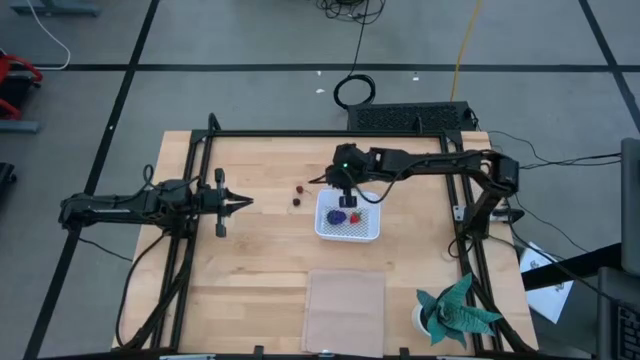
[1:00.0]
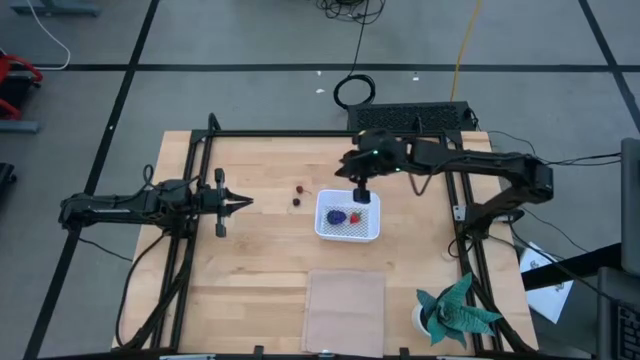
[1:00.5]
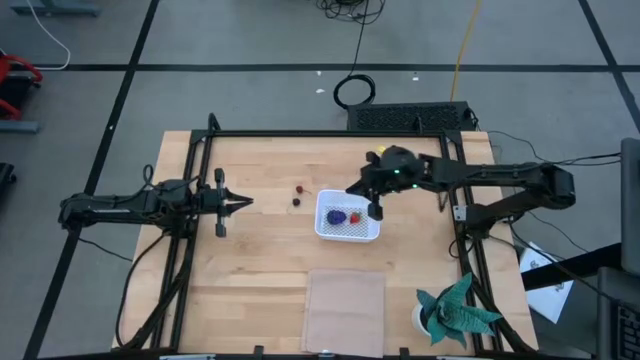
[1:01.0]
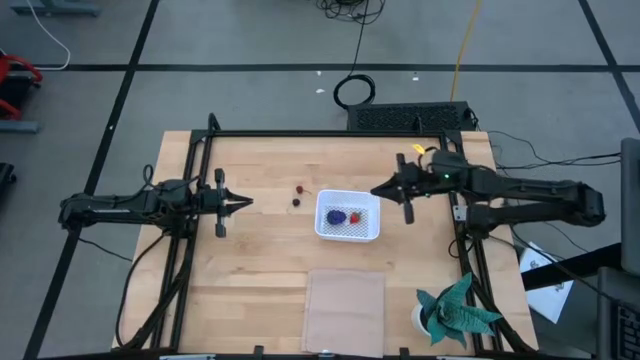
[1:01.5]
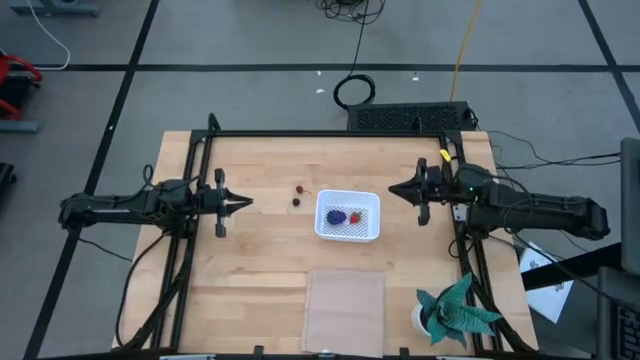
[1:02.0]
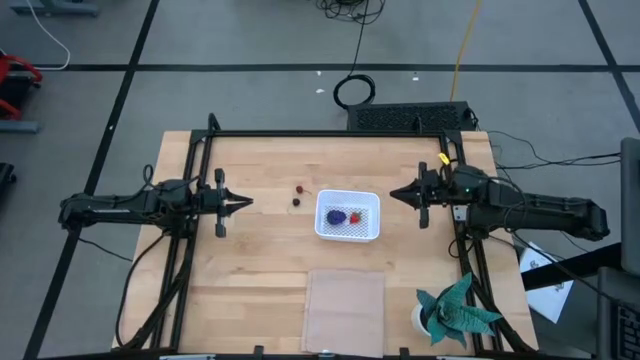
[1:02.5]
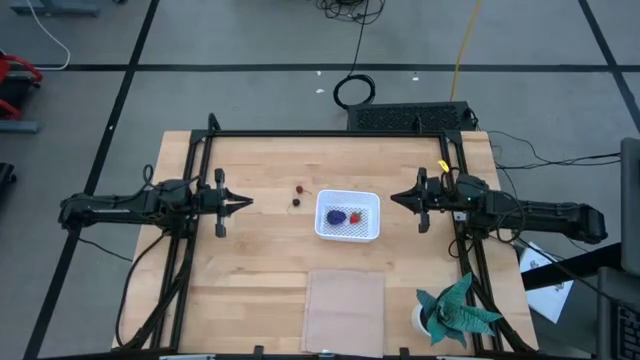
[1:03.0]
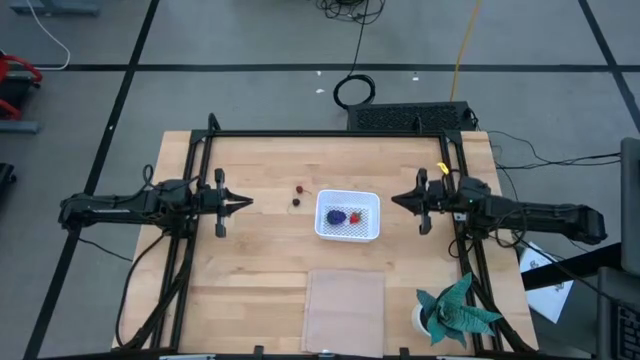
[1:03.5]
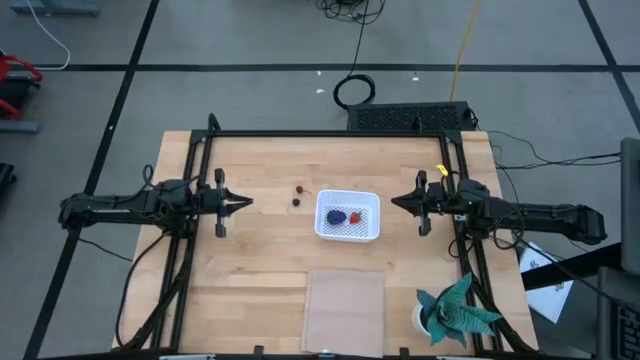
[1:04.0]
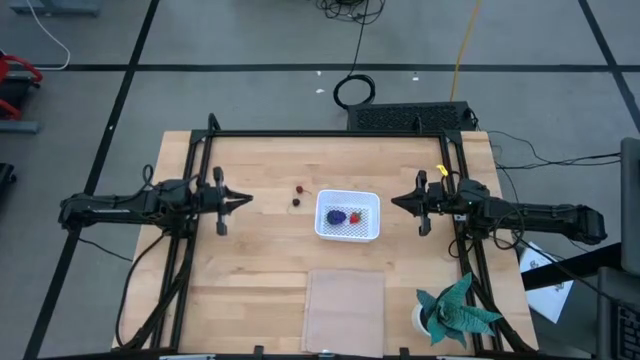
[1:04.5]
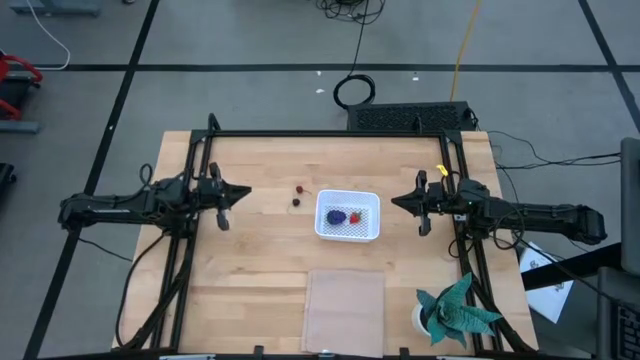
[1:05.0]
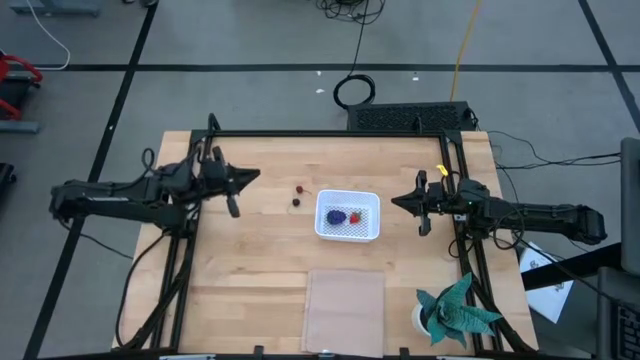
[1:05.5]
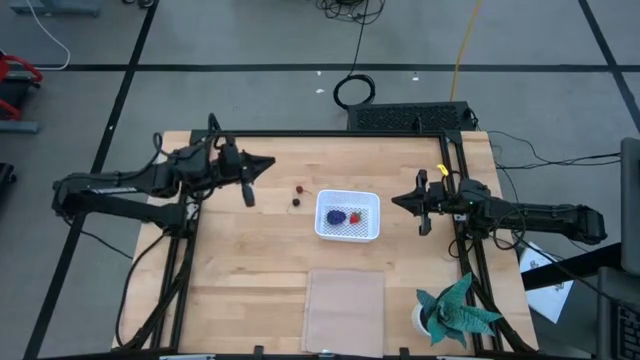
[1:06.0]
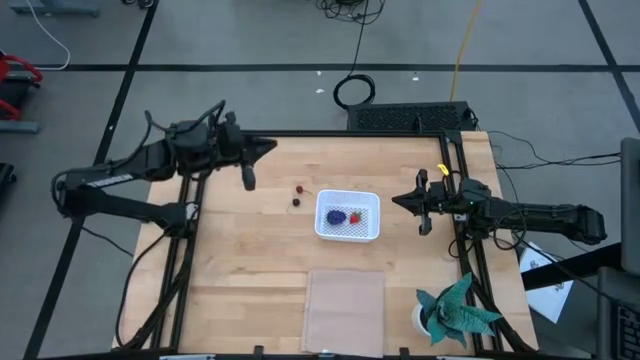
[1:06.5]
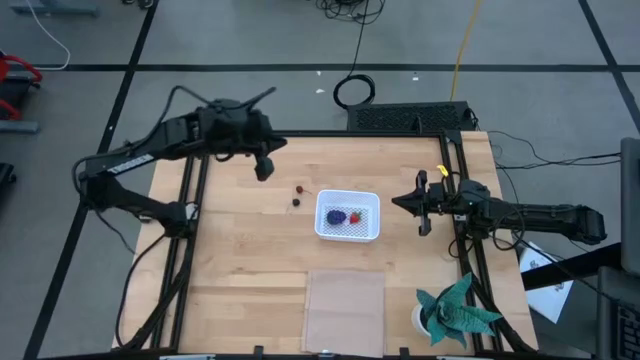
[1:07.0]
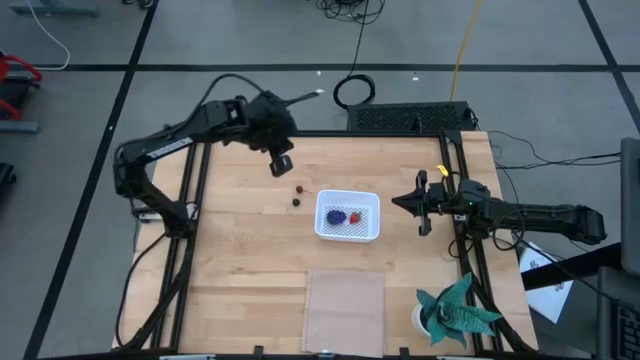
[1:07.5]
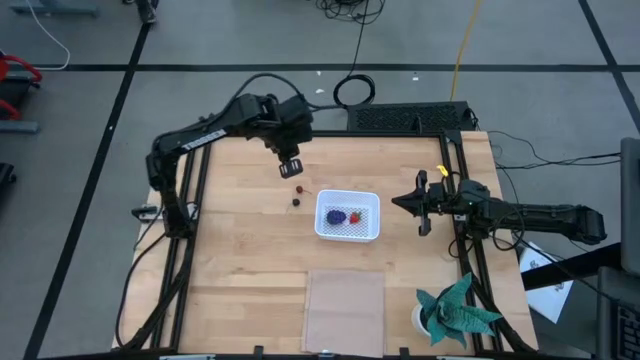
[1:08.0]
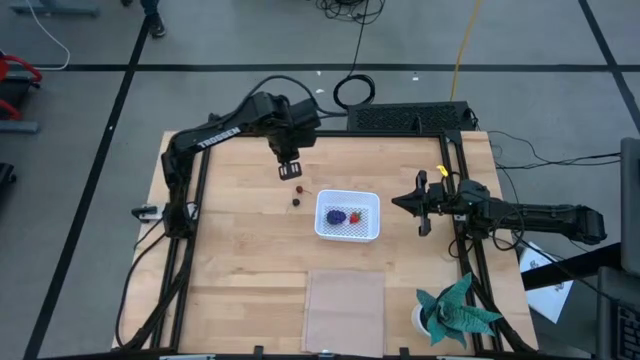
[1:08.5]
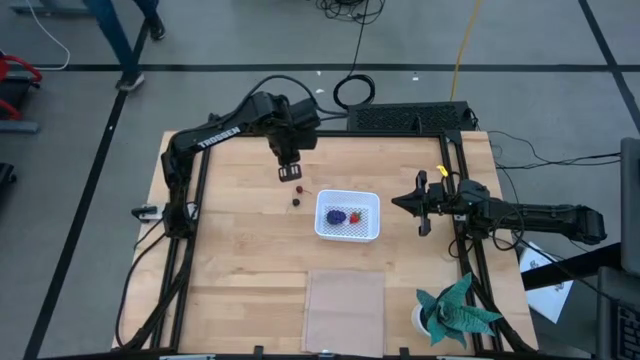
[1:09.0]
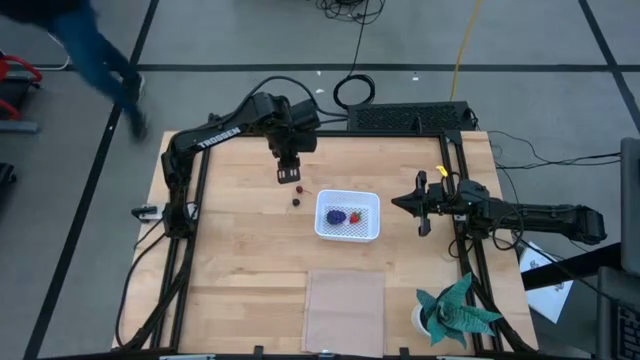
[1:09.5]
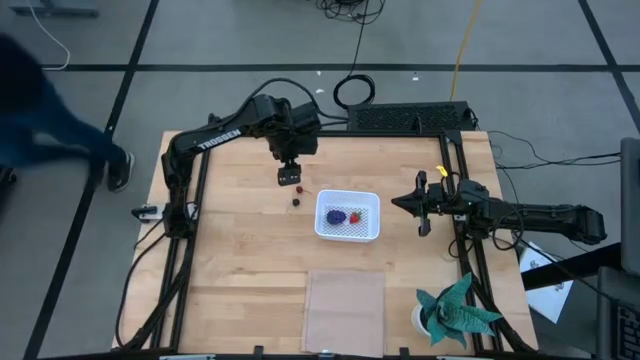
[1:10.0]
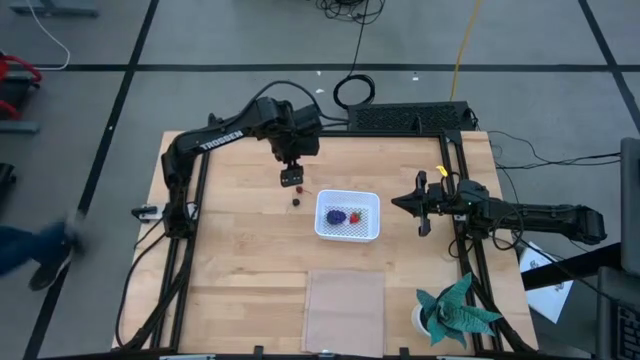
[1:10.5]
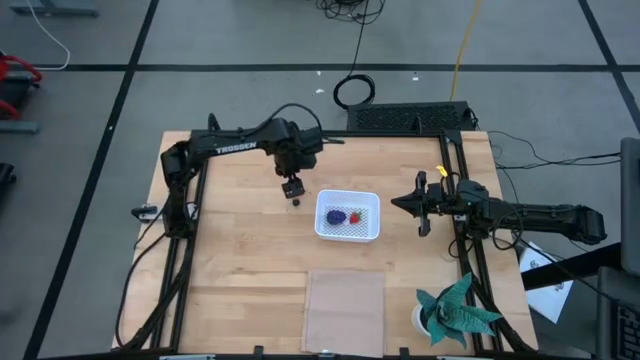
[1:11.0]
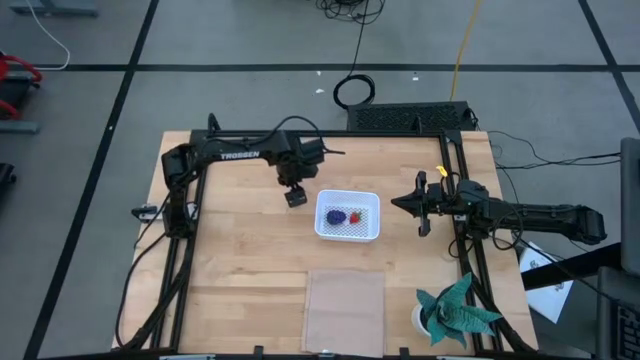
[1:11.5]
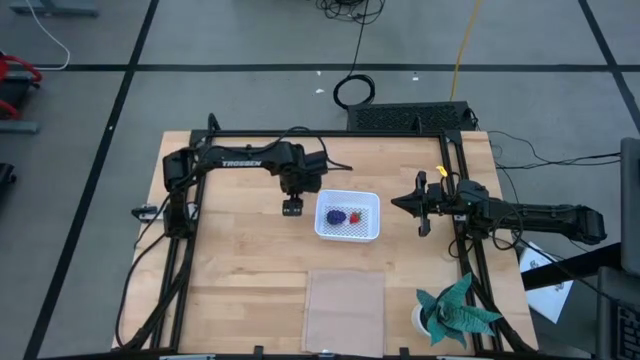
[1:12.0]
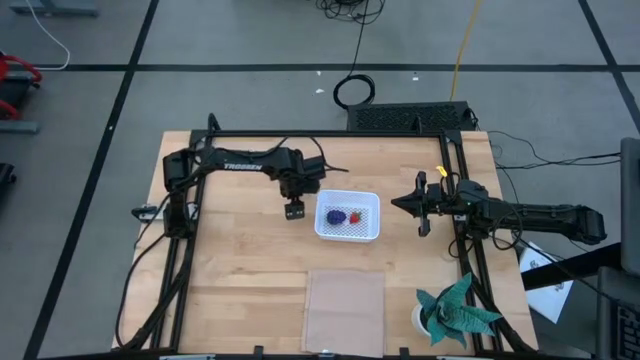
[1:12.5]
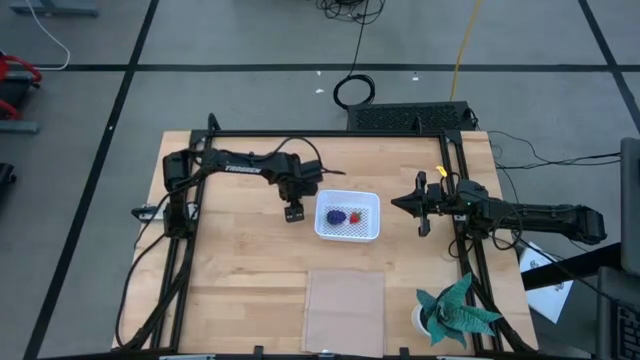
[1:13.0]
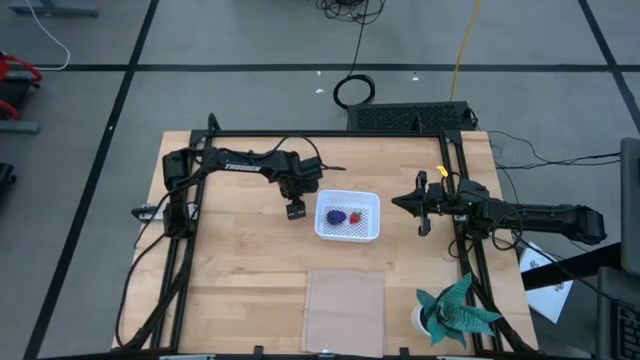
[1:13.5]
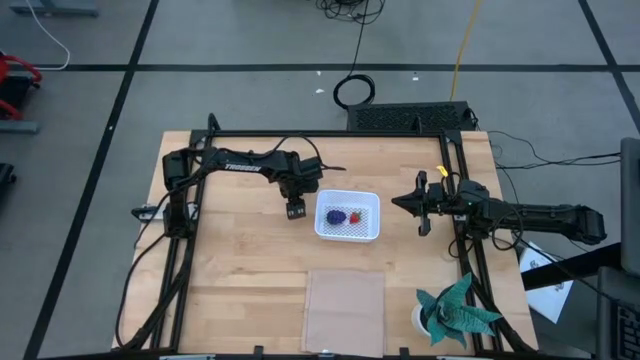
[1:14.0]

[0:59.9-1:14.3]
Task: Pick and placing Produce into tupperware
Put the black cherry into the white basket

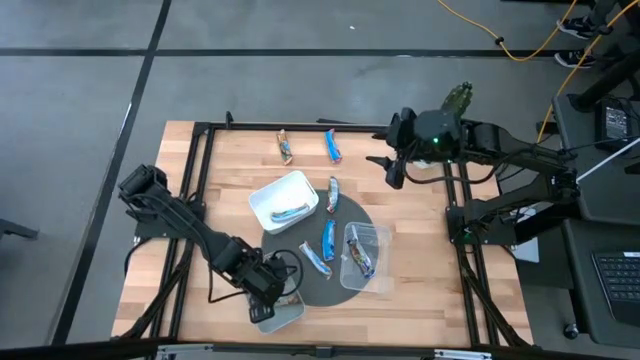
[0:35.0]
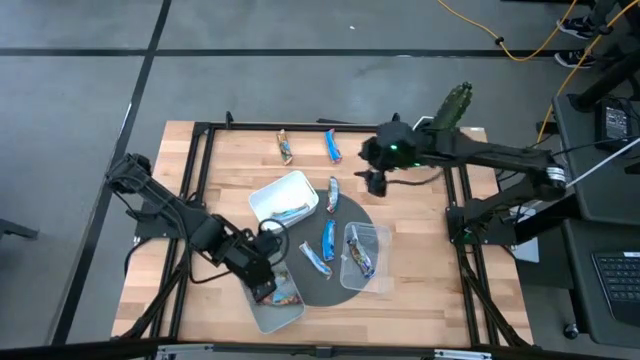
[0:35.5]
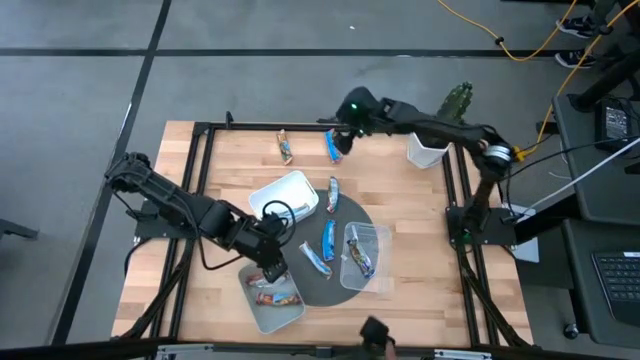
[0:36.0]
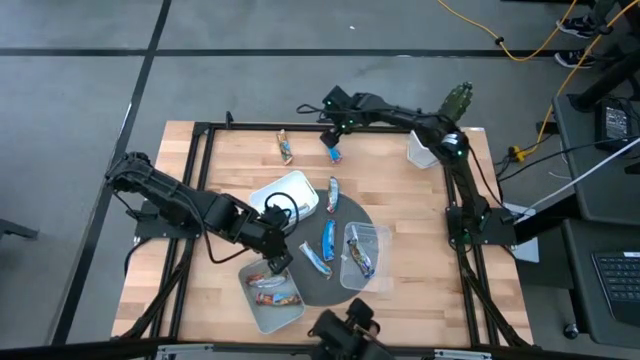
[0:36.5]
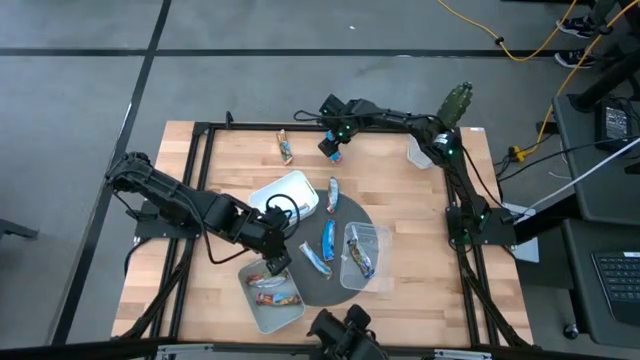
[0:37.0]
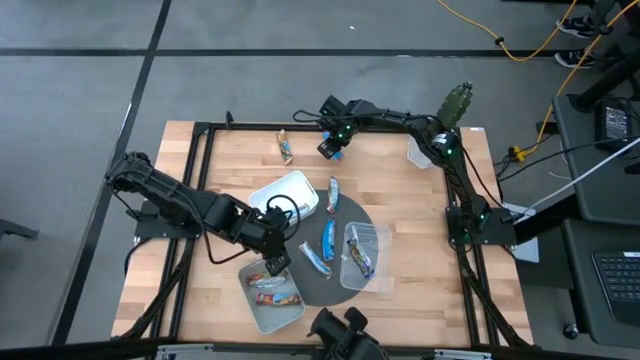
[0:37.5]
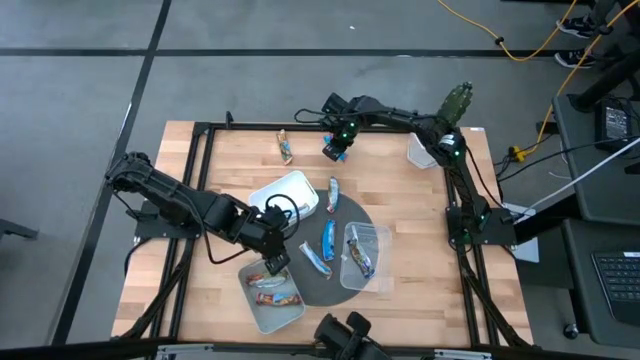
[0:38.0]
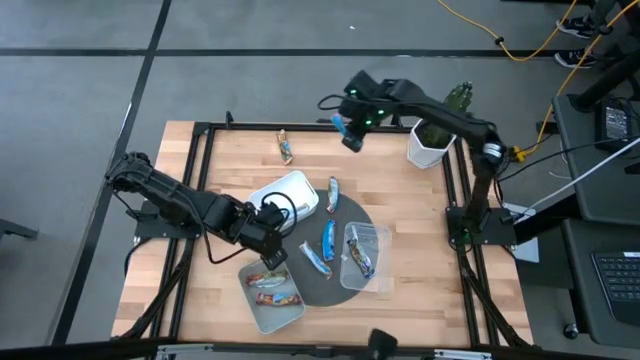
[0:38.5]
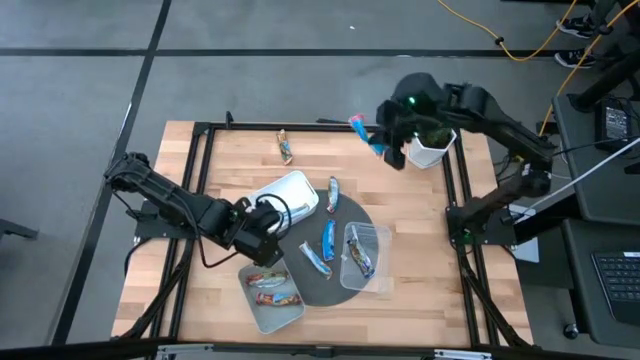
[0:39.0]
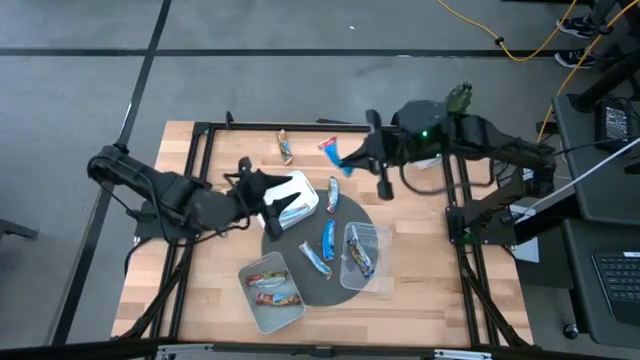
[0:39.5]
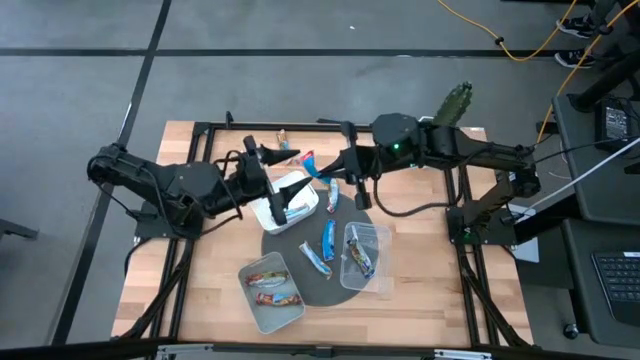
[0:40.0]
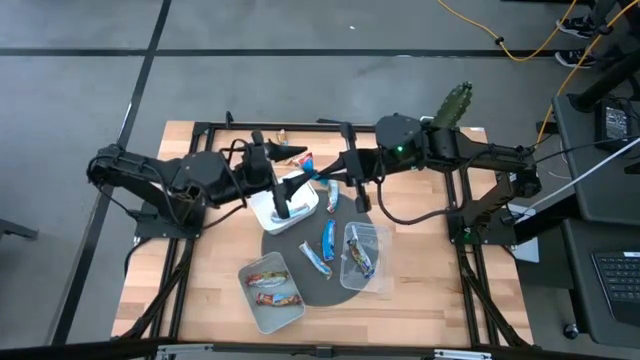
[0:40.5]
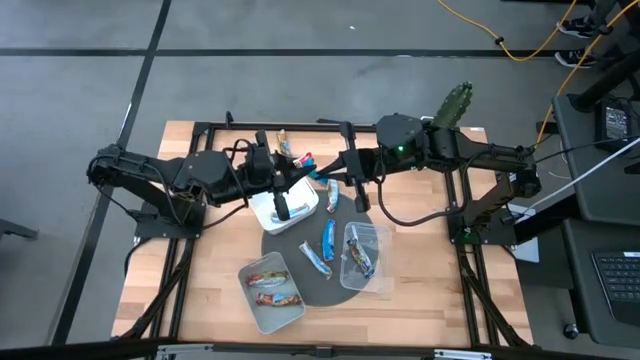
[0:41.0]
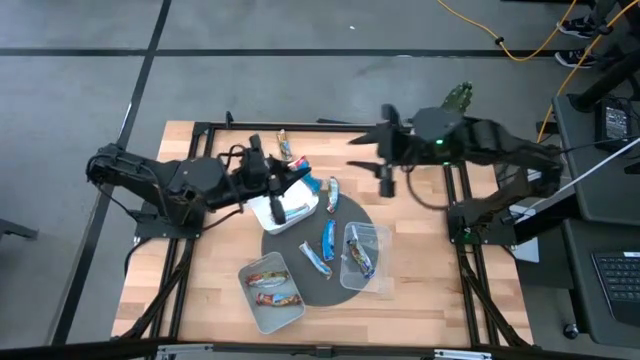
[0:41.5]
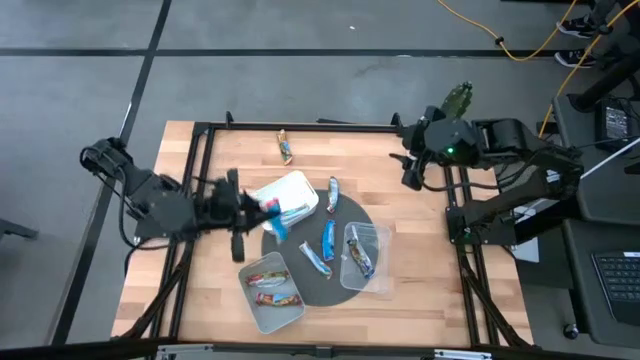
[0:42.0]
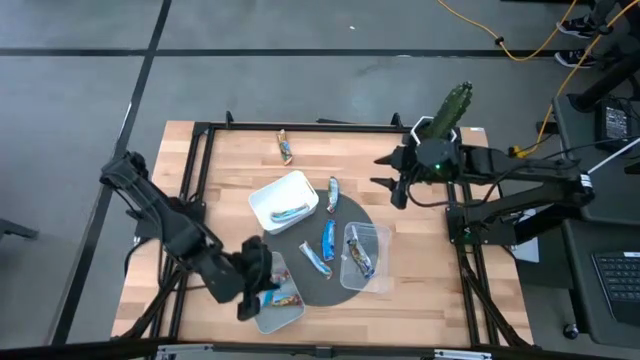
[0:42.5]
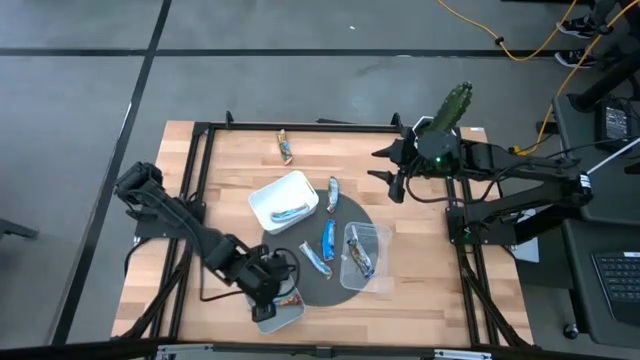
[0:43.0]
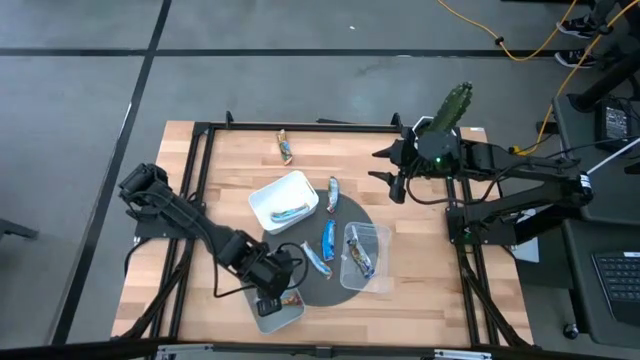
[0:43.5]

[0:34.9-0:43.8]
Task: Pick and place Granola Bars by type
Put the red granola bar into the gray bin
